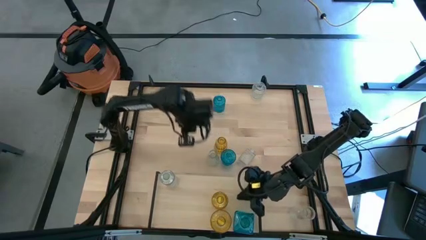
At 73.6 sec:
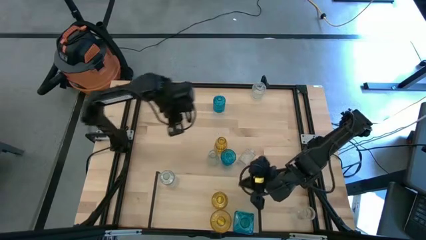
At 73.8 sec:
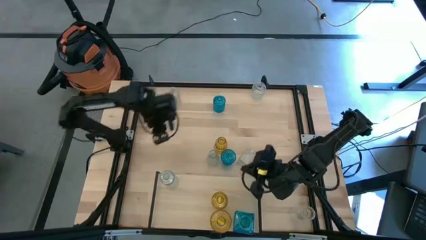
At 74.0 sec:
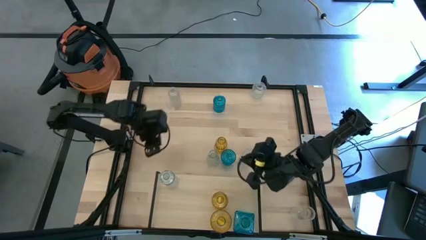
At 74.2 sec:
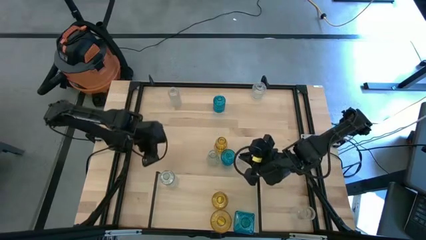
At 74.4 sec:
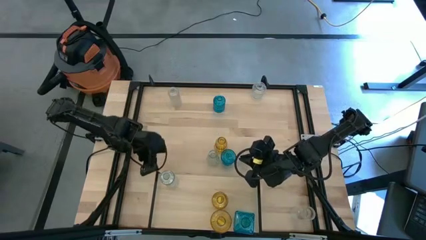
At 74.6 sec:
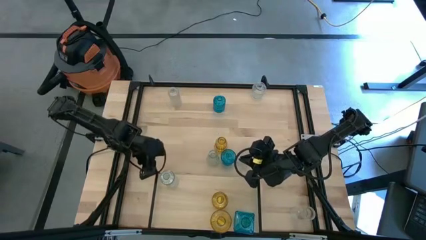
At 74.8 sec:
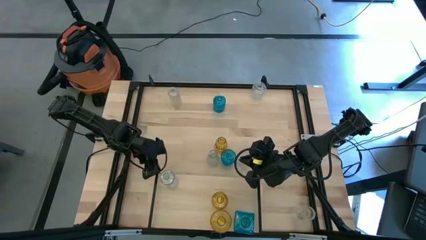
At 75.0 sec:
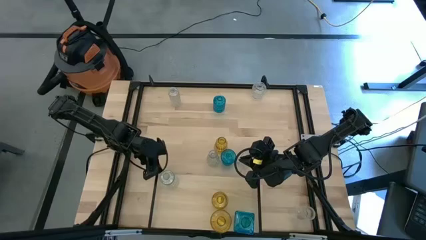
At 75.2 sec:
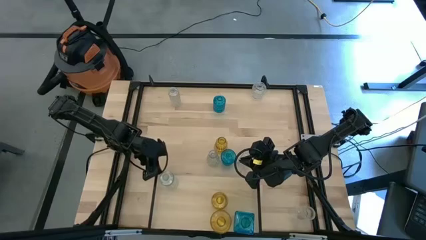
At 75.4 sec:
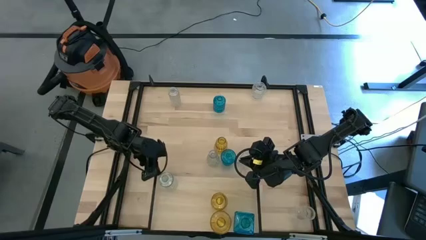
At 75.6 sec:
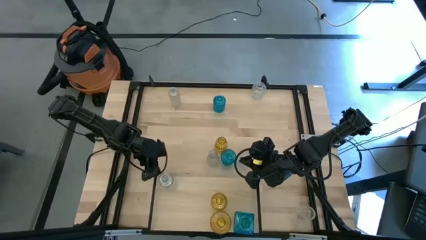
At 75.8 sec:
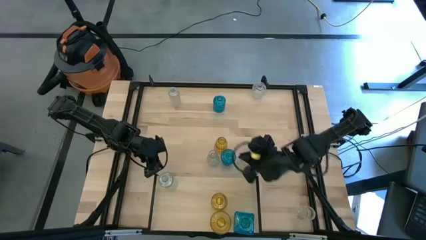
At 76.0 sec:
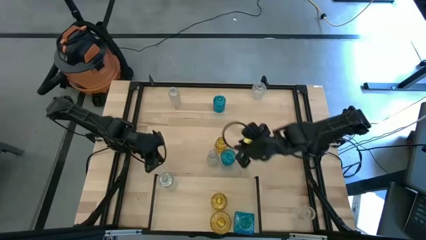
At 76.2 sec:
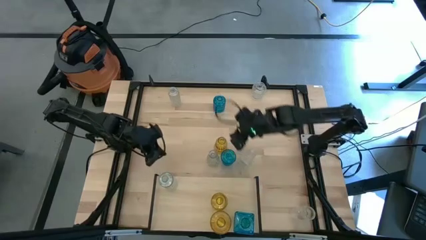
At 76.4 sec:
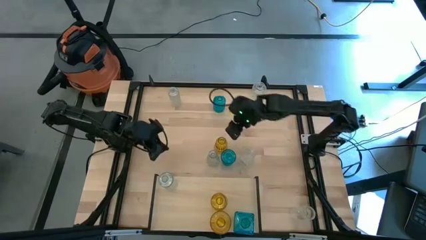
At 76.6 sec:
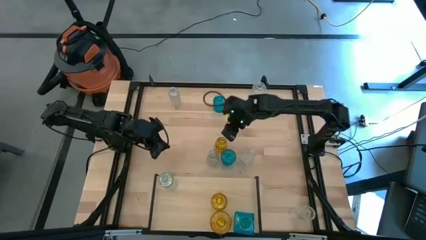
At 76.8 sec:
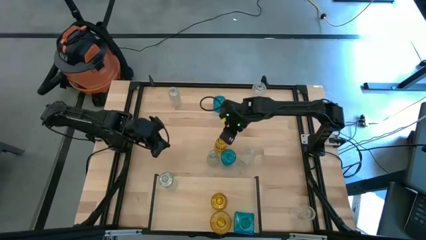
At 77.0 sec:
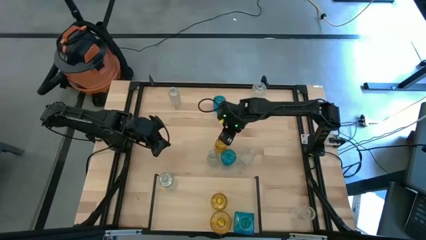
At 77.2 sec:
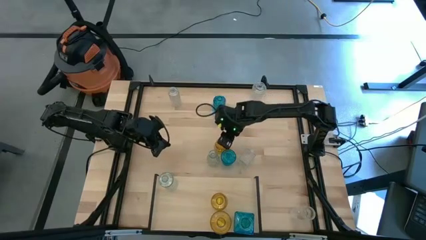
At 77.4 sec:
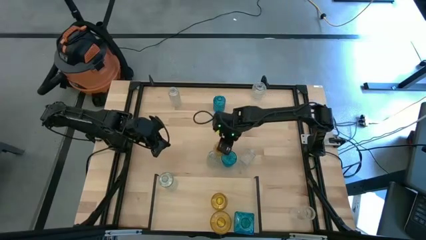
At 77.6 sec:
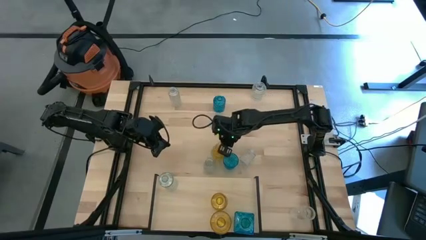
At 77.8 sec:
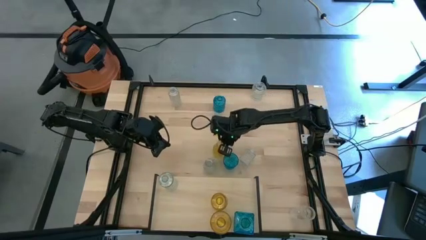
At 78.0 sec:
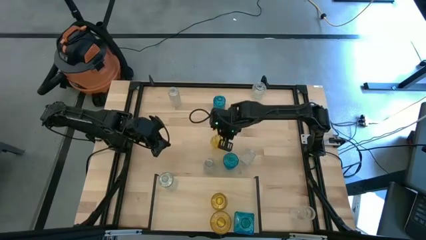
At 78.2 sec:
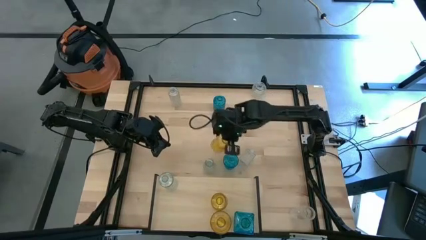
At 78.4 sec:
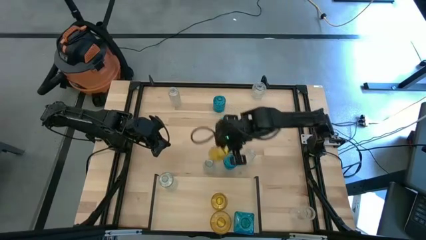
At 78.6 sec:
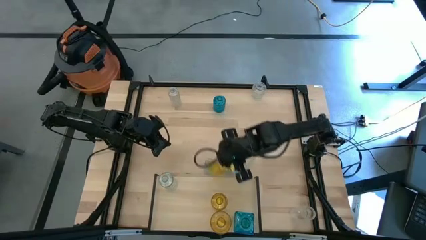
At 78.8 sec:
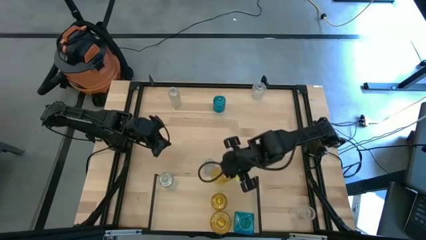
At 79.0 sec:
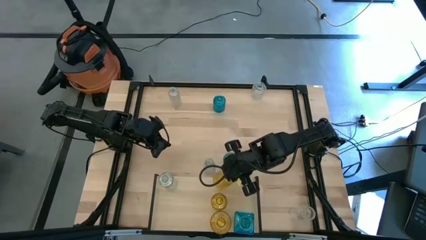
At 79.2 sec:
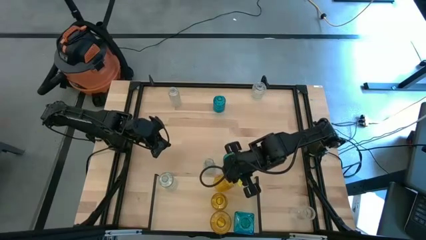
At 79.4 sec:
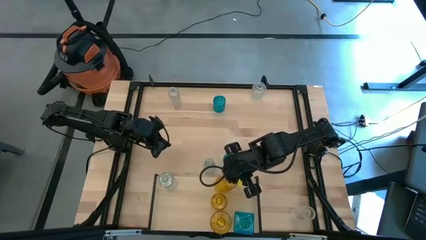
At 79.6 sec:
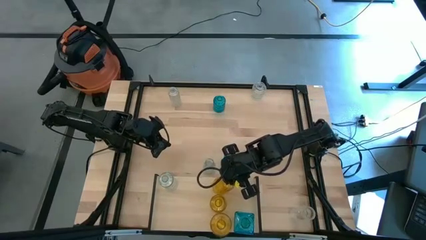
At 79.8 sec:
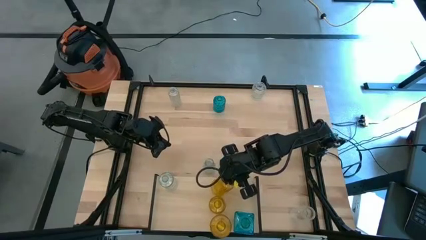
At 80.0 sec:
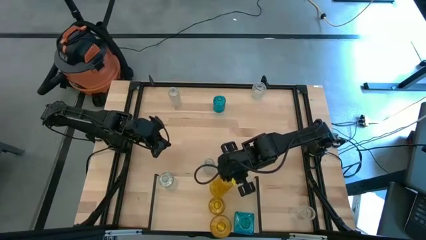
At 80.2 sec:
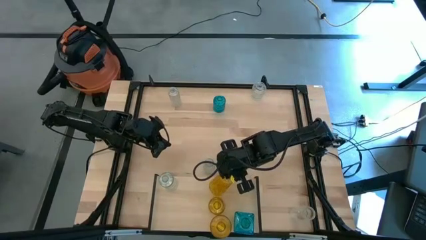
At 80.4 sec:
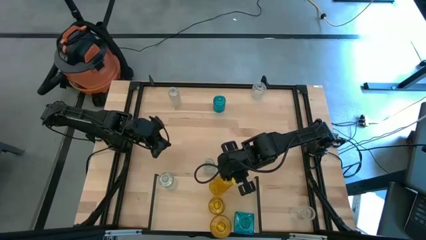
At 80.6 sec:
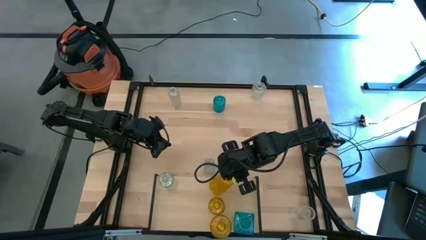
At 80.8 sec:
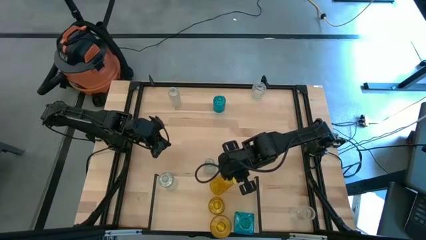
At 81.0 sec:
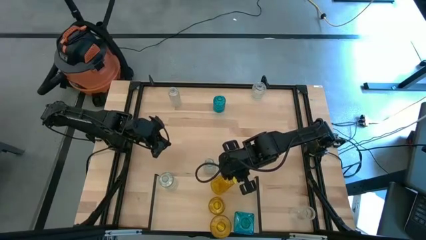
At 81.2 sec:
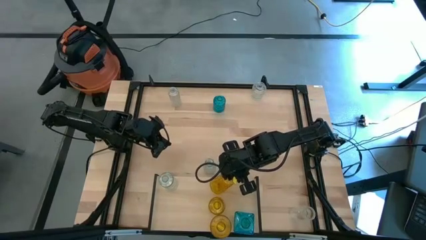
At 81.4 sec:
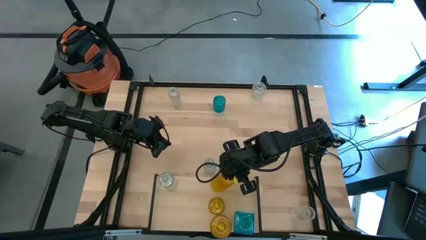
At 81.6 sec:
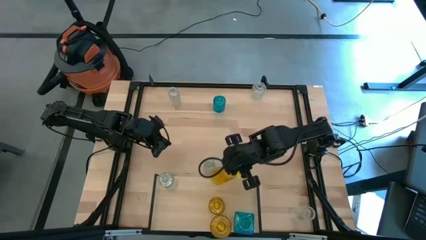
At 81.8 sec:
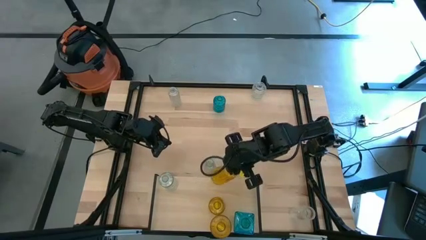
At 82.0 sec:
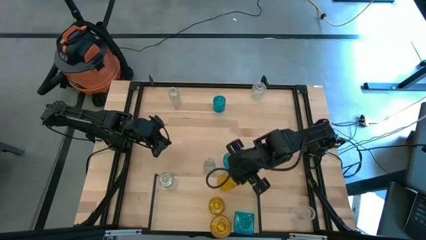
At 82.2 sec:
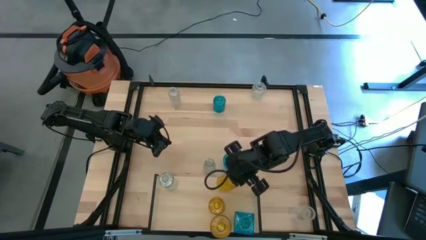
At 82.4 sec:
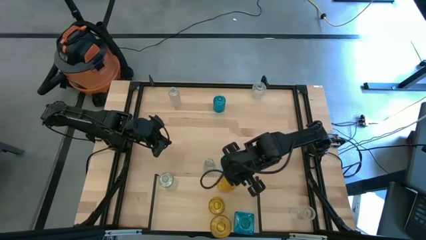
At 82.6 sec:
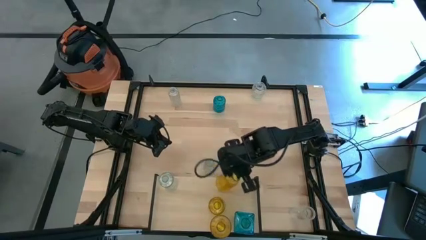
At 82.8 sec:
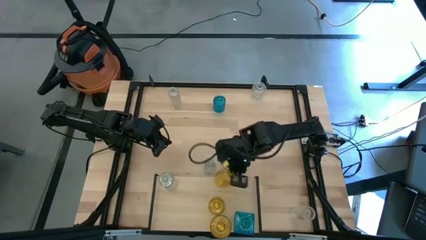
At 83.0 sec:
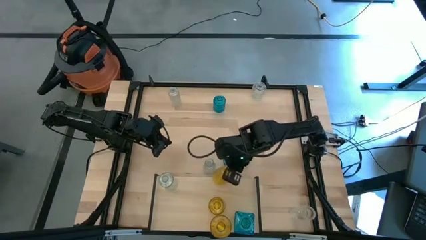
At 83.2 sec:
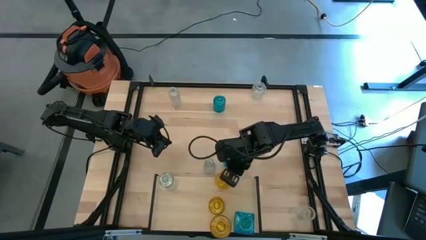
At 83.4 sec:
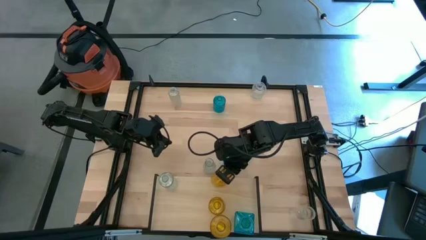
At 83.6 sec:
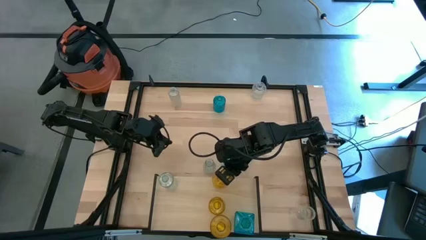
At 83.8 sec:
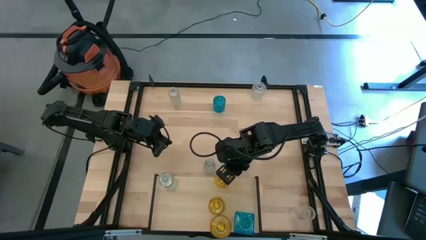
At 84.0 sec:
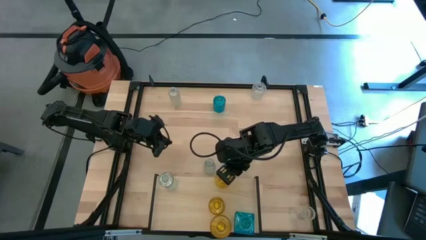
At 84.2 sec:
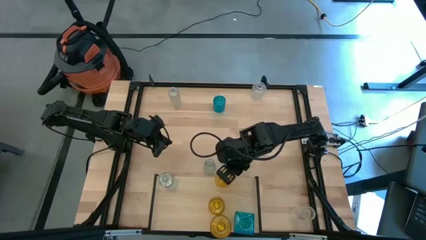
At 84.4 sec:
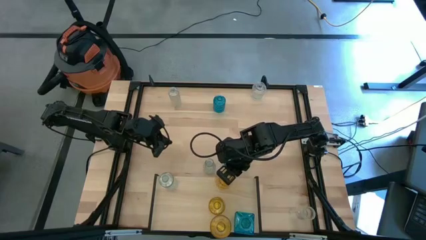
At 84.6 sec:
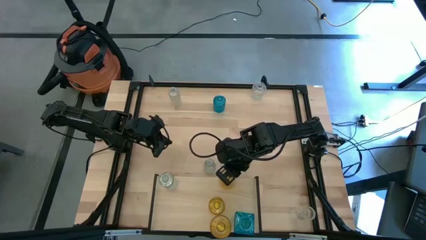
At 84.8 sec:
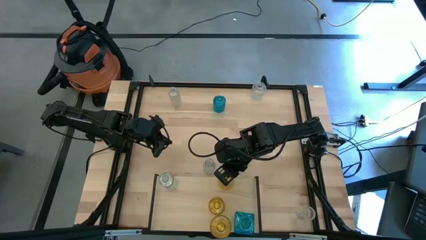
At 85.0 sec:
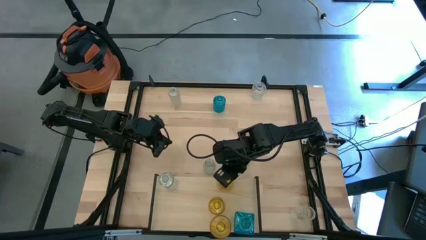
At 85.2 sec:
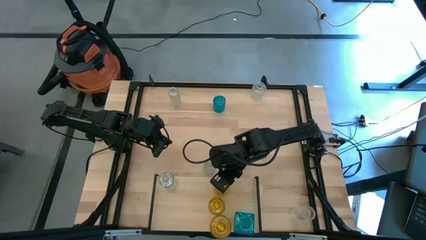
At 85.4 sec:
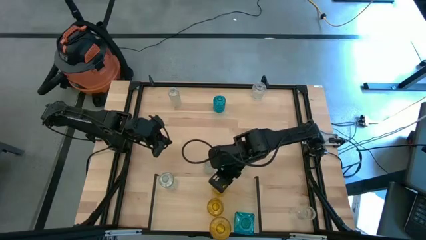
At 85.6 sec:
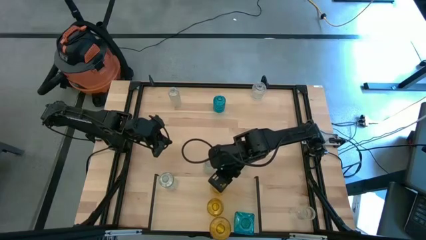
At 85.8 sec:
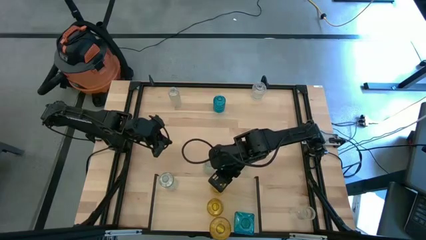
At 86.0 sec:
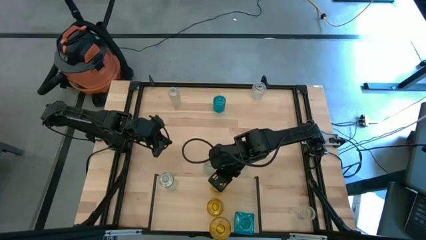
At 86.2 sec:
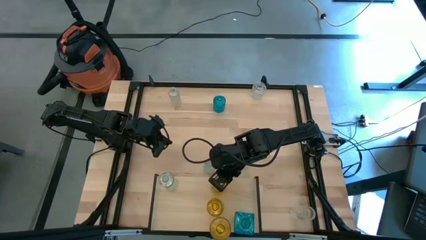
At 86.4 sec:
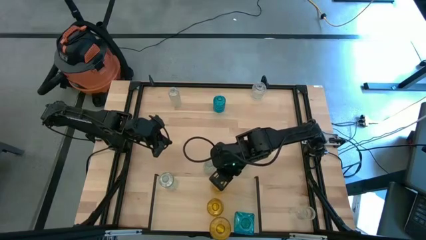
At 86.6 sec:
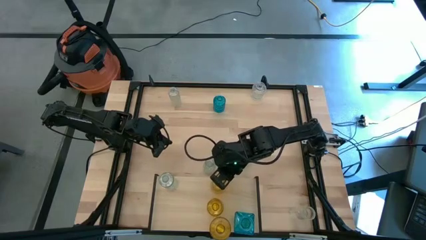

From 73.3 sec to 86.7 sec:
Task: sort vases onto shelf
Put the yellow vase on the shelf aligned with the other yellow vase

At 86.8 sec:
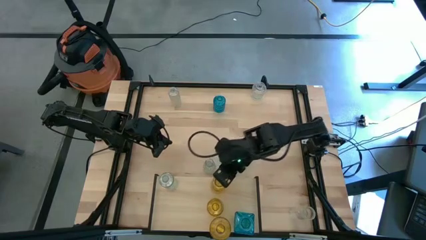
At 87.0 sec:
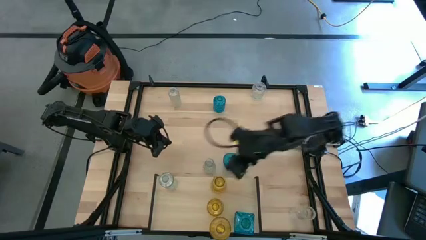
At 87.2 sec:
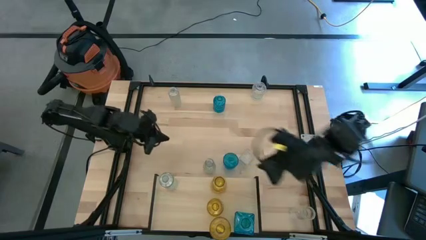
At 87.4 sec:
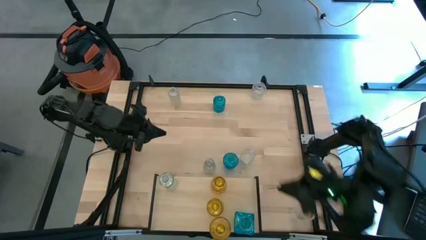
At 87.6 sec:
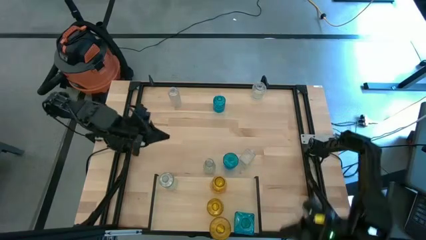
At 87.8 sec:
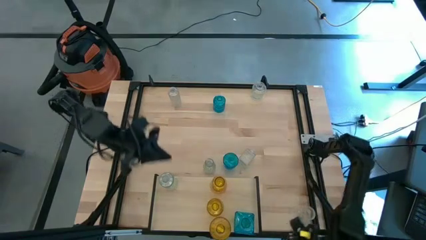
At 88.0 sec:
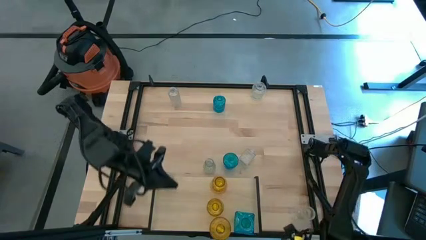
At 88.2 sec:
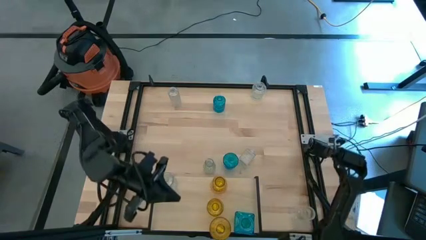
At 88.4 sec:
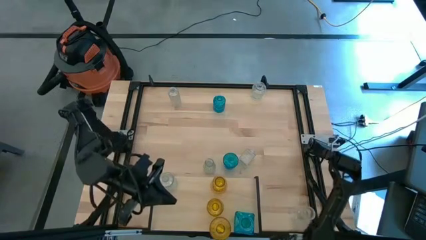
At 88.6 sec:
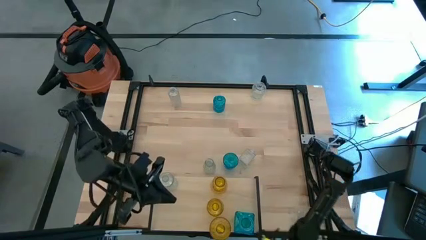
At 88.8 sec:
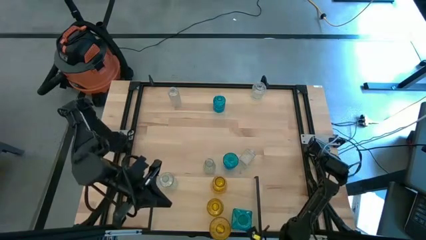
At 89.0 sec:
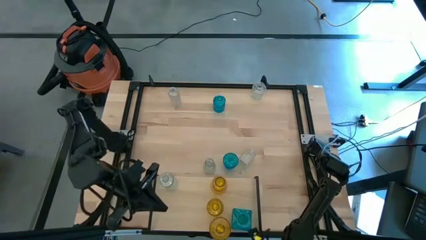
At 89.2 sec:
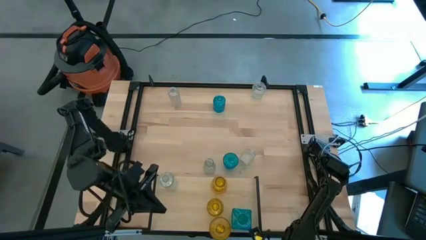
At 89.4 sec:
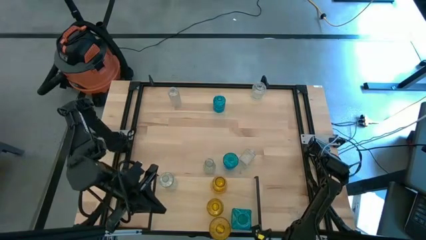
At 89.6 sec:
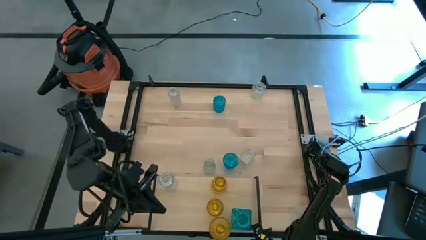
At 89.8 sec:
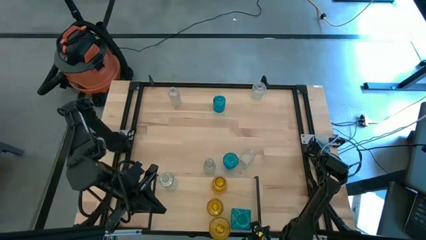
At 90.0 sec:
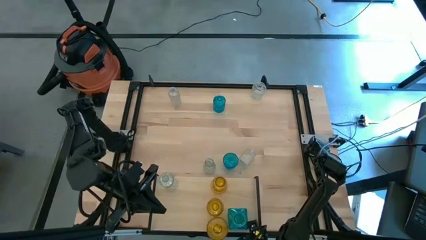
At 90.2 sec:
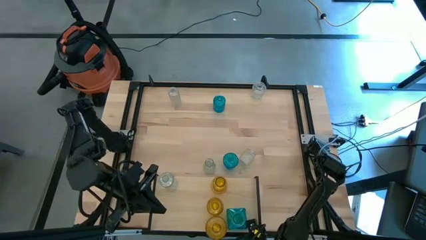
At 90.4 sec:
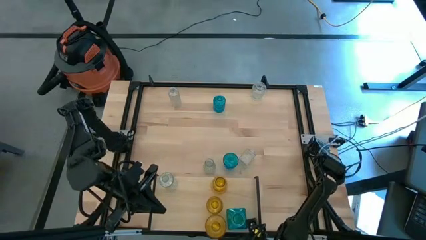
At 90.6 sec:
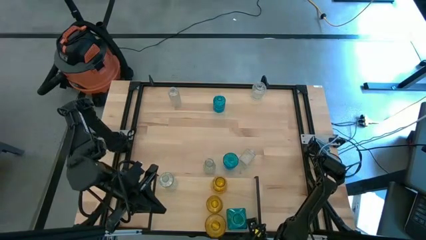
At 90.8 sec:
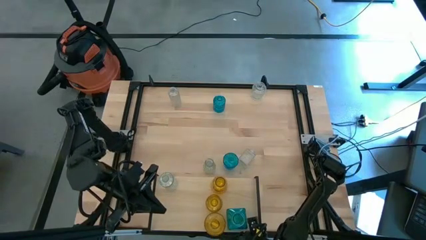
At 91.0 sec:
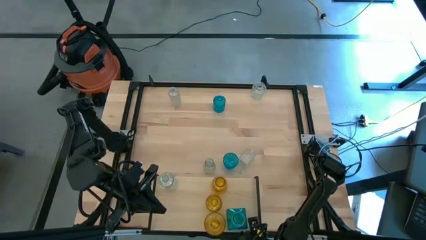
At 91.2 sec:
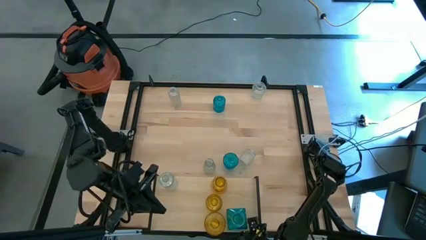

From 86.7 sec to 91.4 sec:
Adjust the vases on the shelf
